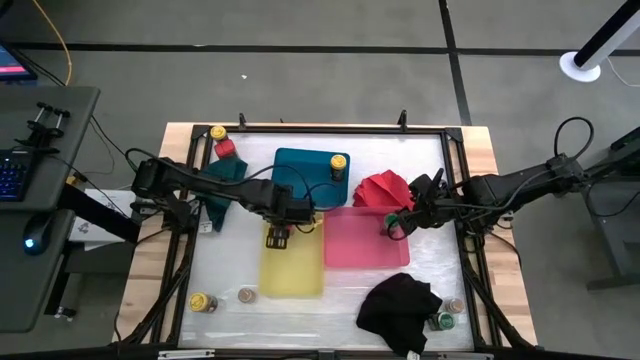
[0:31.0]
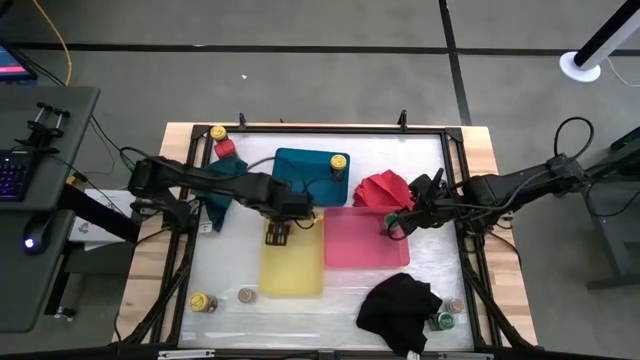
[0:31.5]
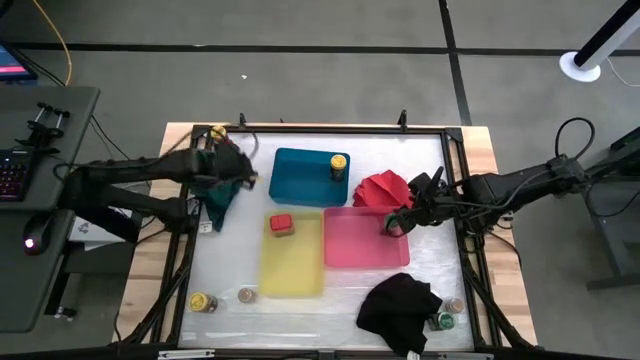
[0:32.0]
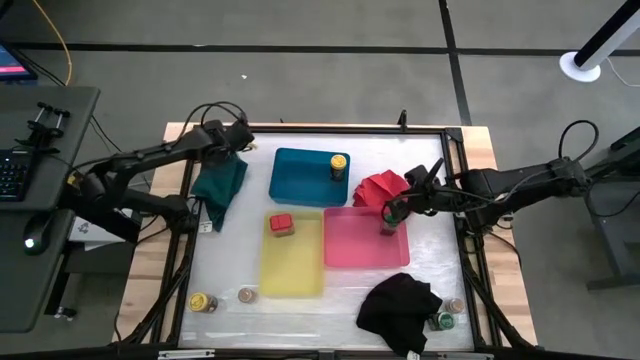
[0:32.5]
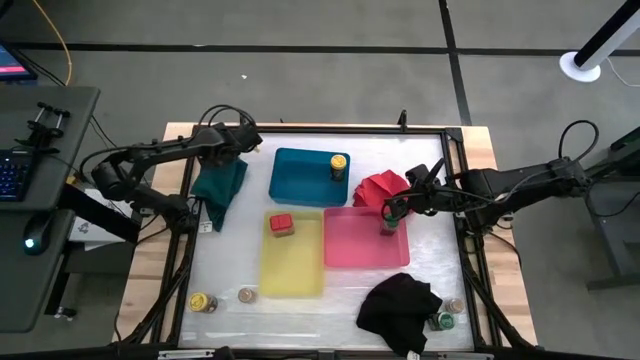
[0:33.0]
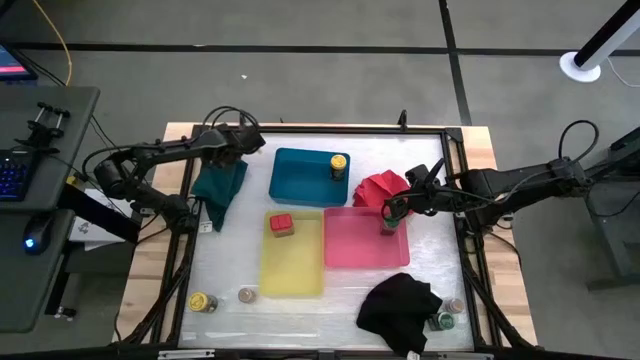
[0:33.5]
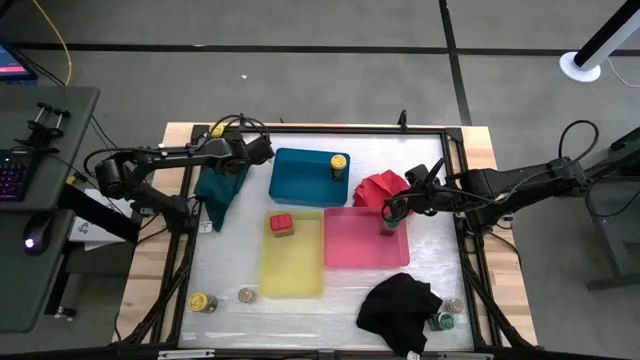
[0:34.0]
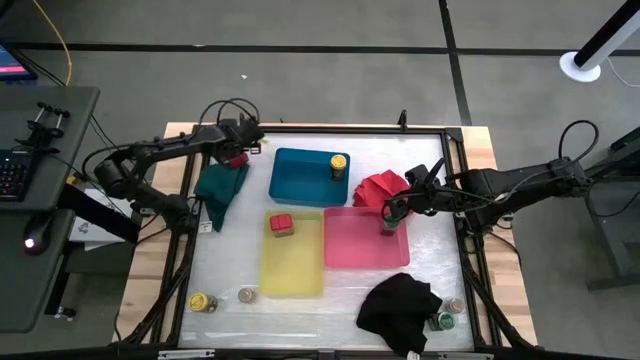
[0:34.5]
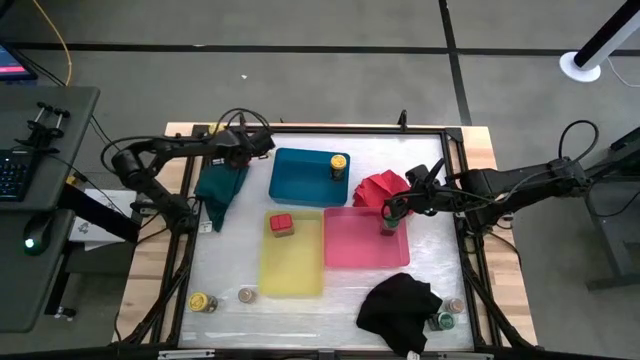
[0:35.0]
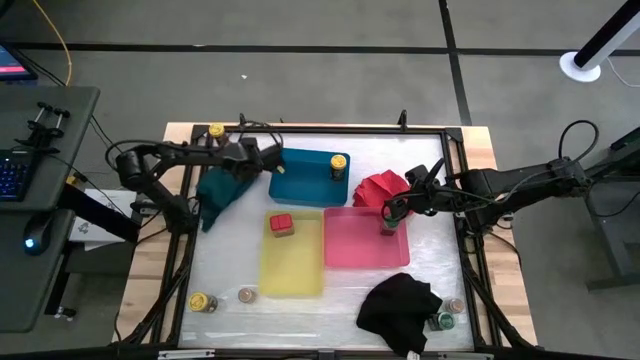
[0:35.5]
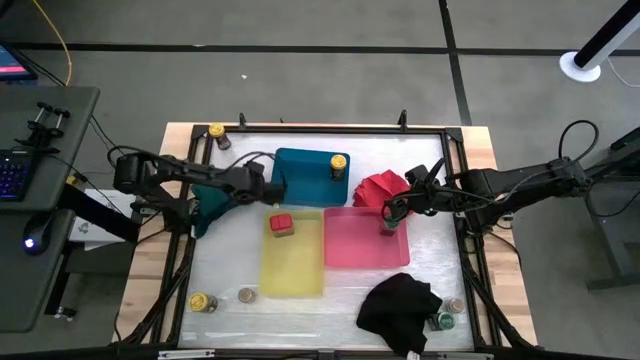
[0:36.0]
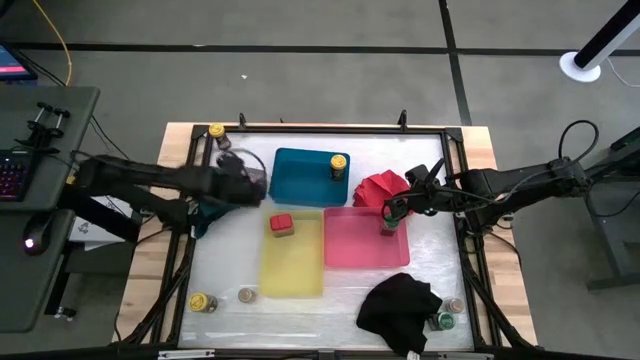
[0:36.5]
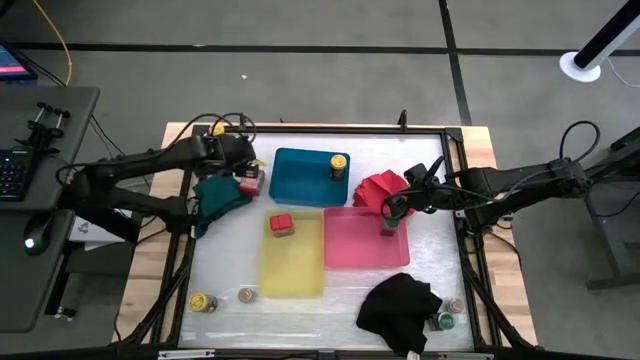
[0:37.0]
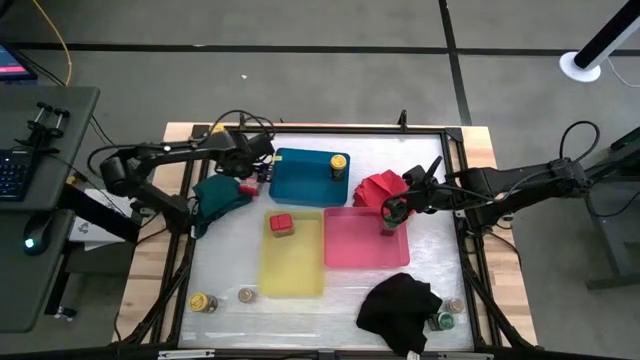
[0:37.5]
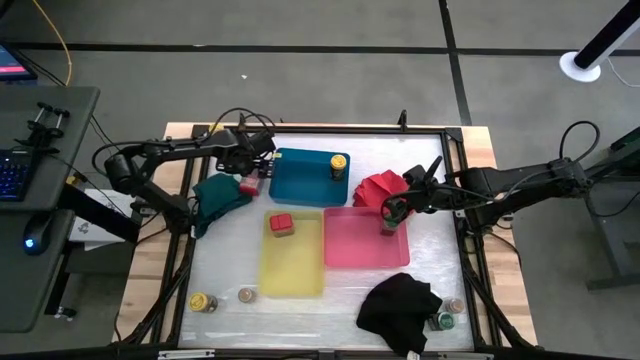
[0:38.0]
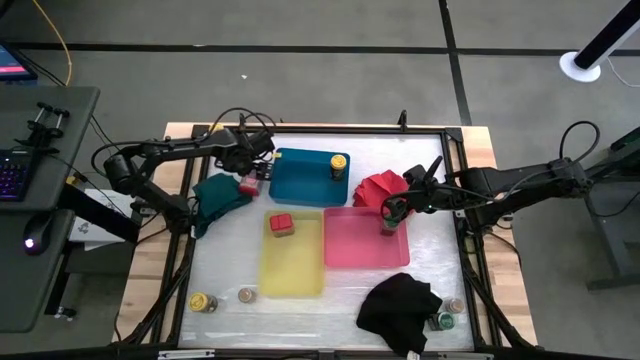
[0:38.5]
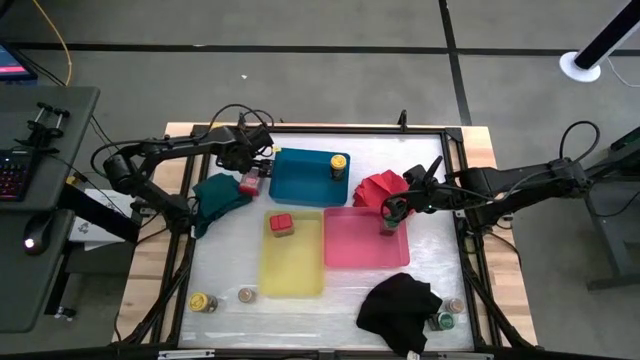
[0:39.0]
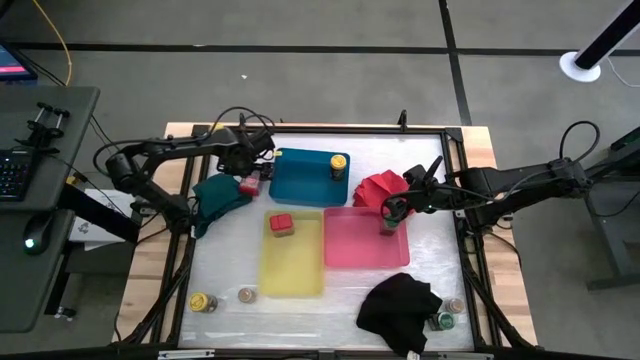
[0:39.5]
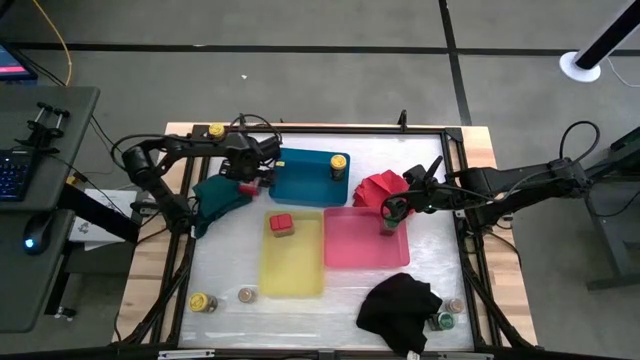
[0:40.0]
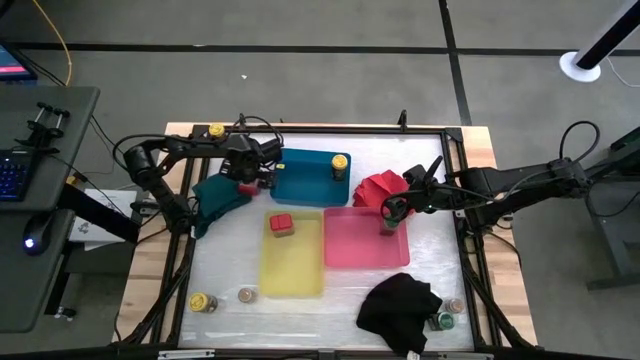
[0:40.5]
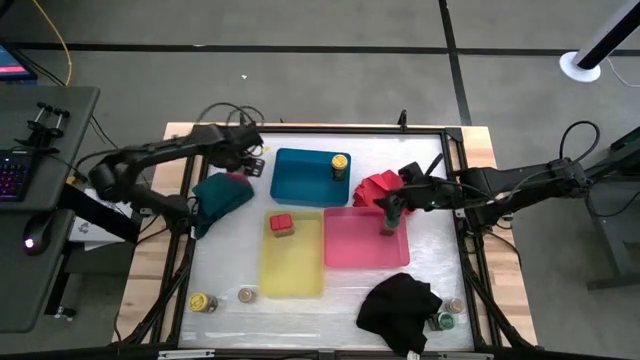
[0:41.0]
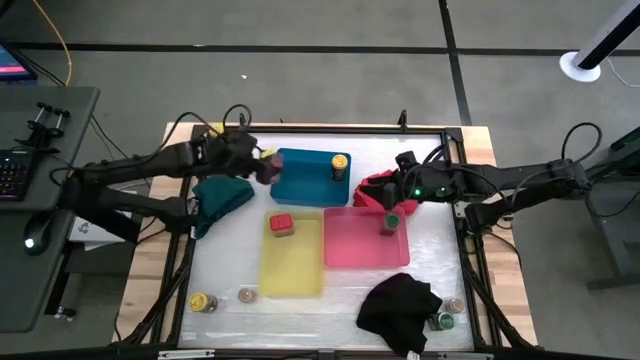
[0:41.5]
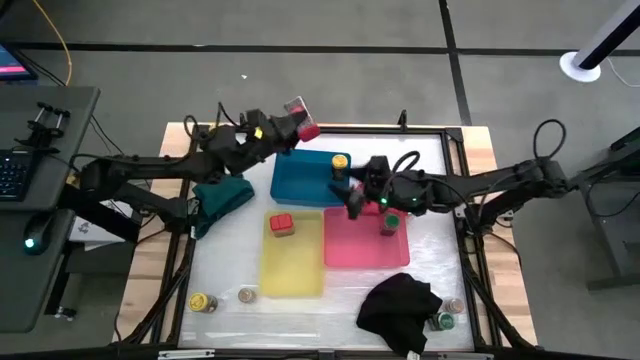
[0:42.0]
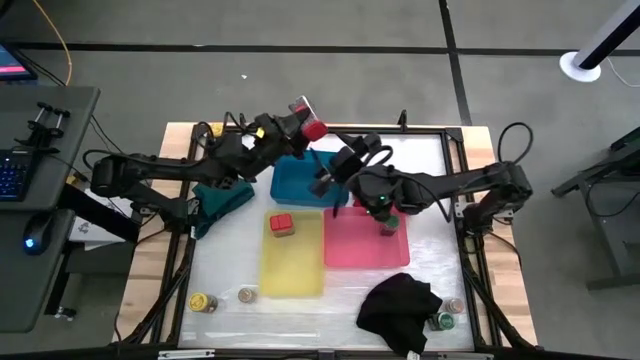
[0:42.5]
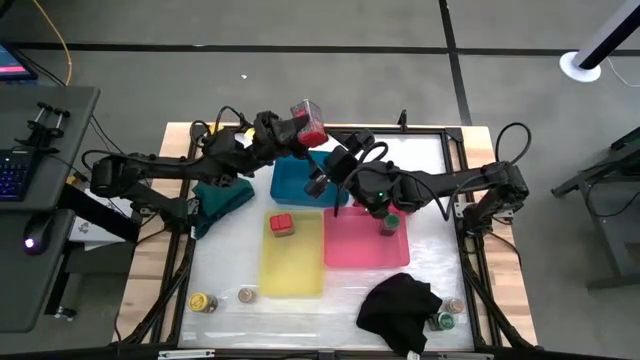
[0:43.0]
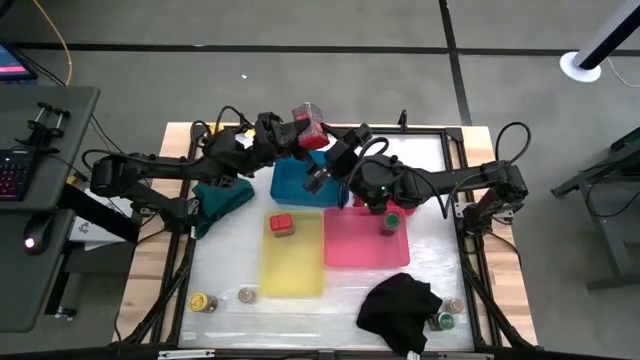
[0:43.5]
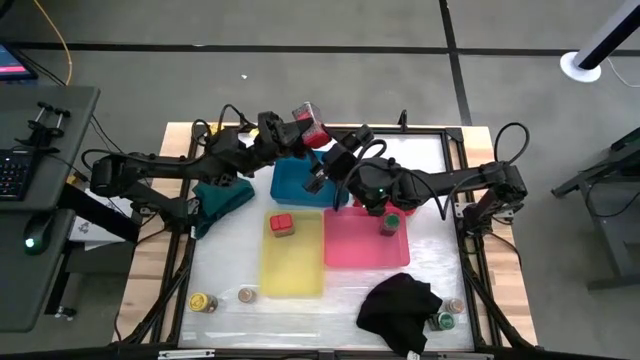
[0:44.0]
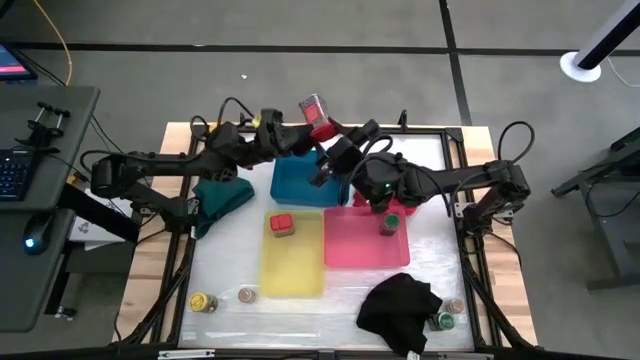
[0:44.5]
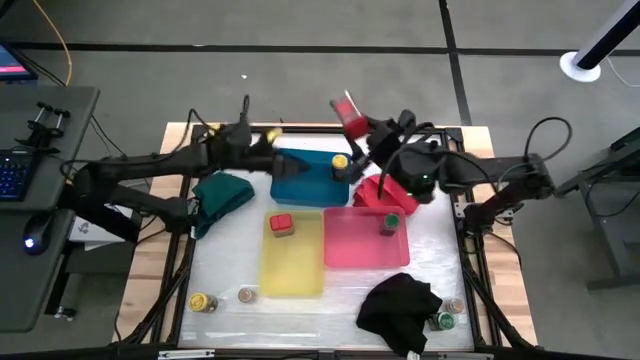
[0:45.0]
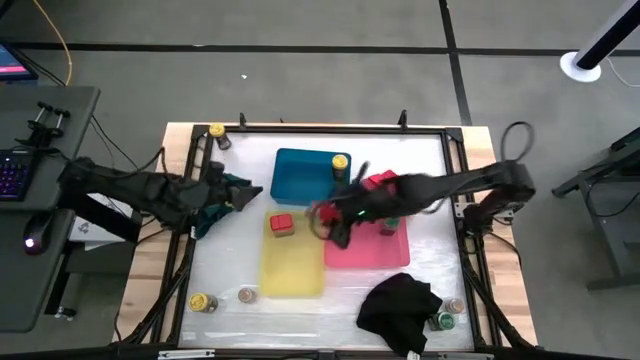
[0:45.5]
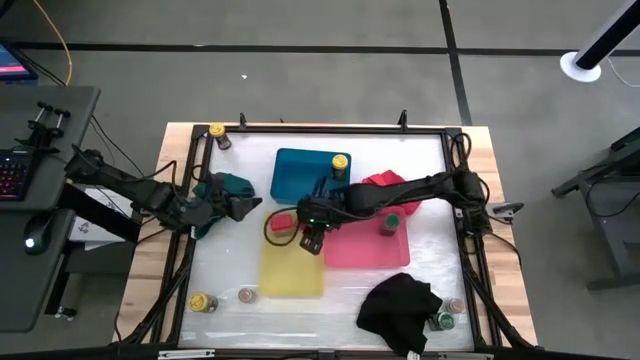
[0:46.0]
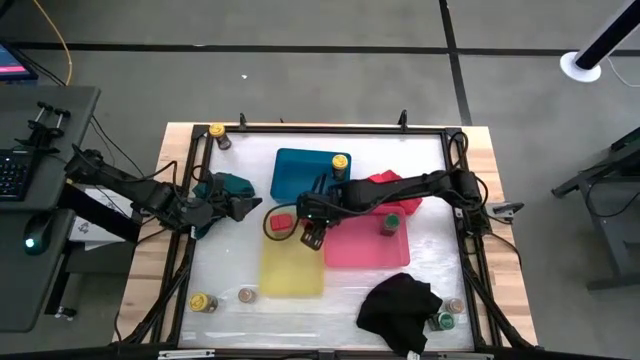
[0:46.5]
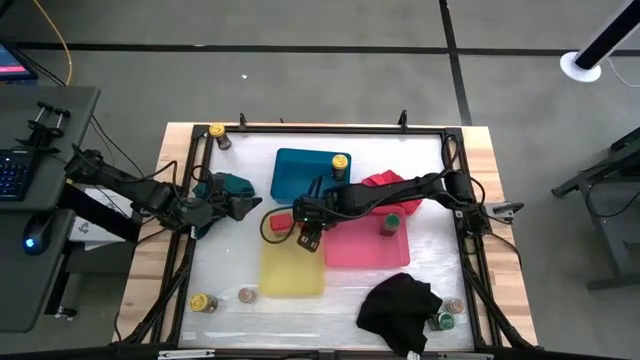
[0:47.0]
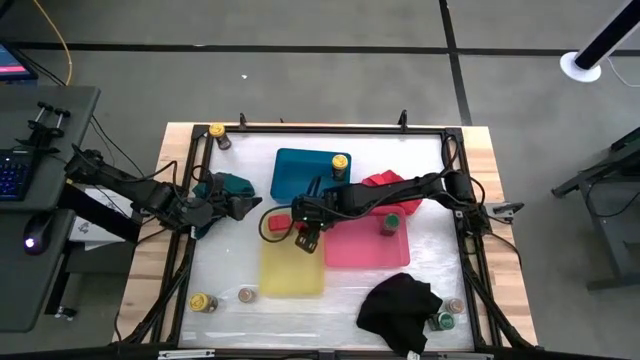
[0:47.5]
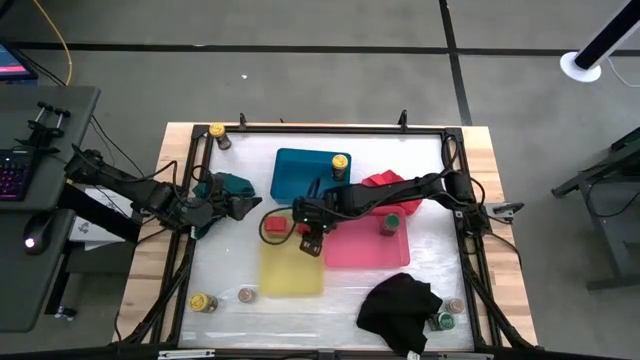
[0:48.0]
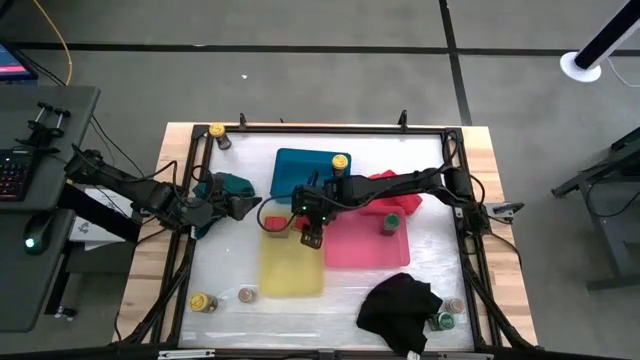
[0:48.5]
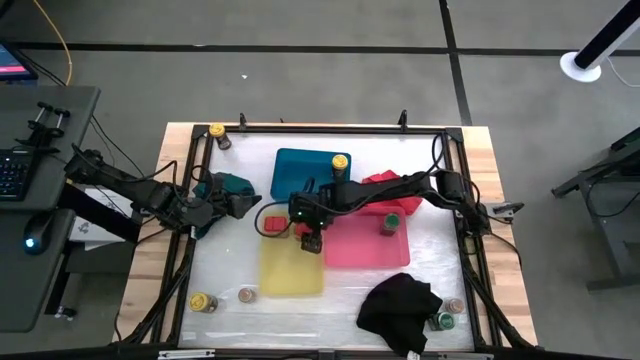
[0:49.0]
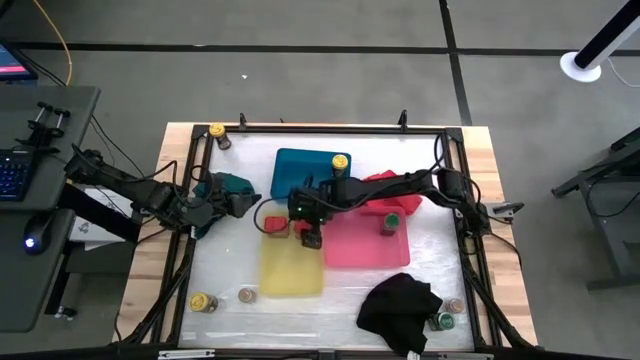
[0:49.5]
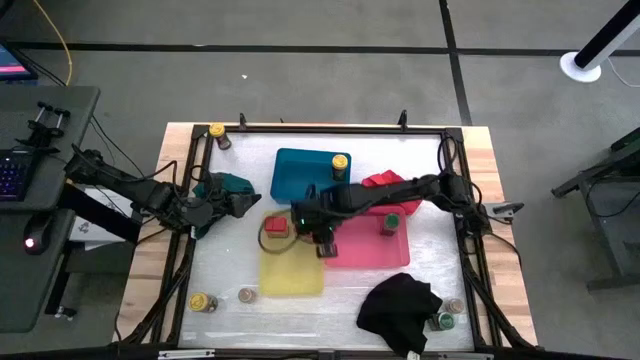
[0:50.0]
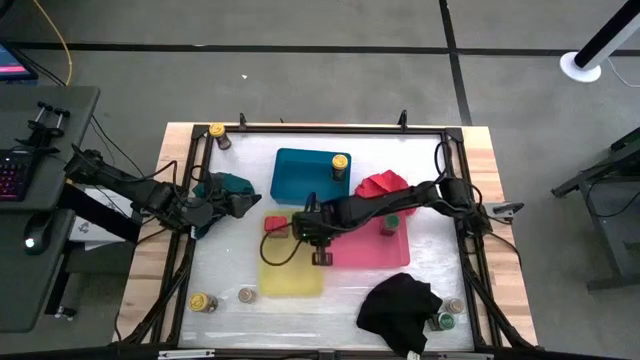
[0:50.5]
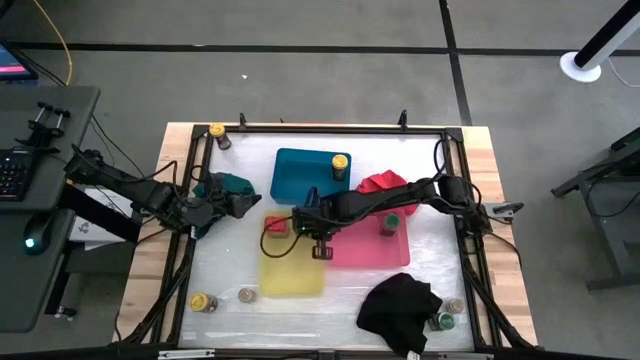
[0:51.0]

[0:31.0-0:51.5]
Task: Sort spices by type
Put the red spice bottle into the yellow bin
